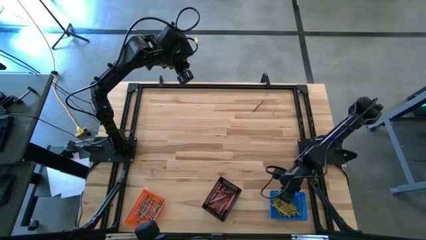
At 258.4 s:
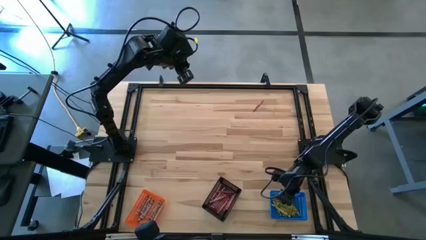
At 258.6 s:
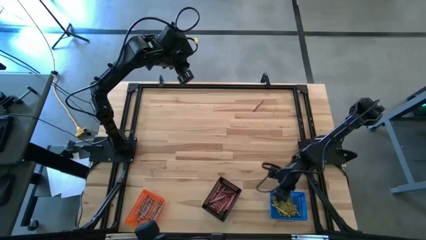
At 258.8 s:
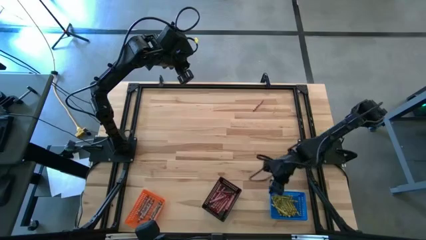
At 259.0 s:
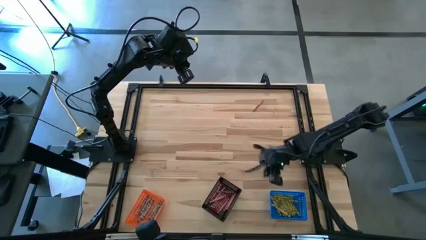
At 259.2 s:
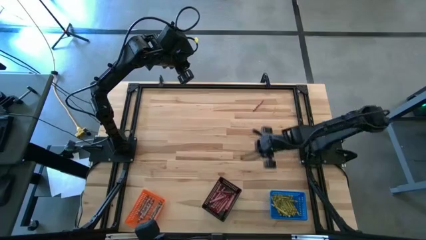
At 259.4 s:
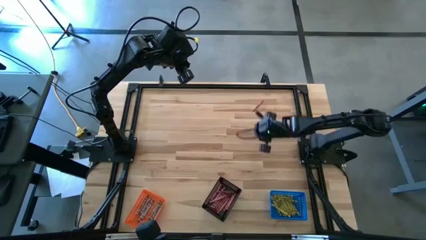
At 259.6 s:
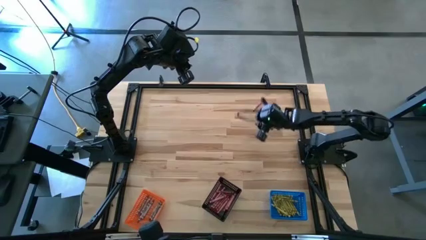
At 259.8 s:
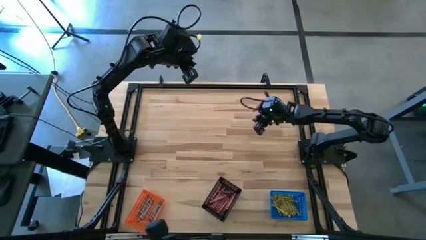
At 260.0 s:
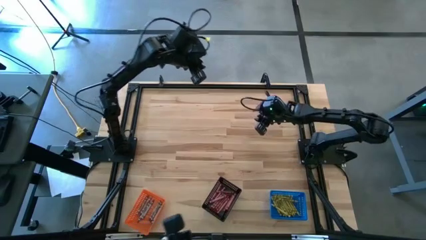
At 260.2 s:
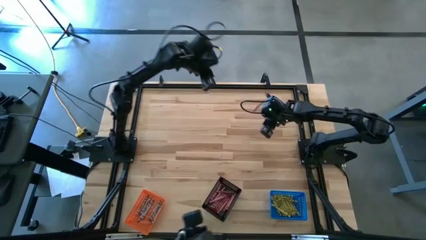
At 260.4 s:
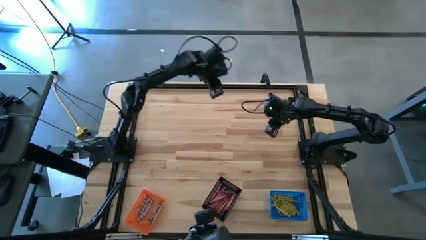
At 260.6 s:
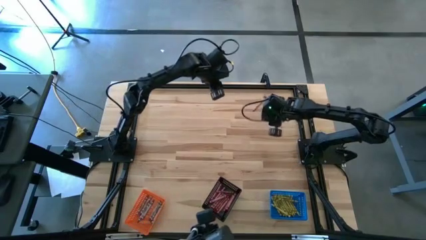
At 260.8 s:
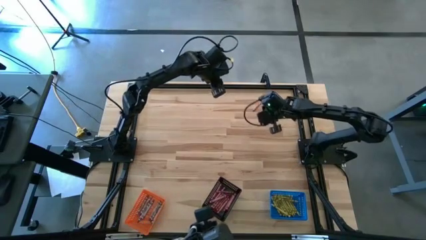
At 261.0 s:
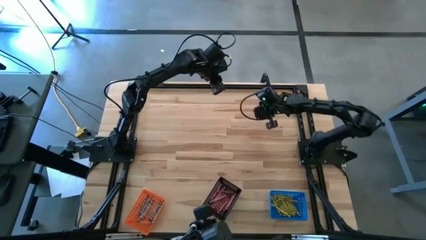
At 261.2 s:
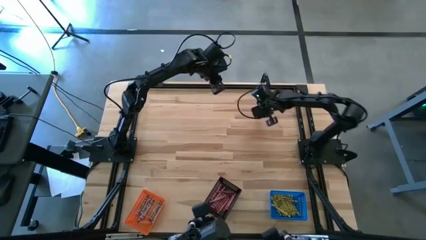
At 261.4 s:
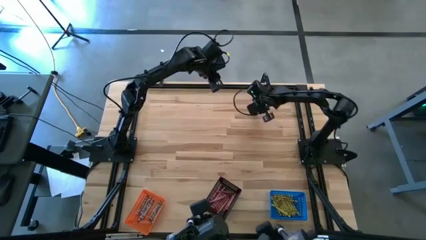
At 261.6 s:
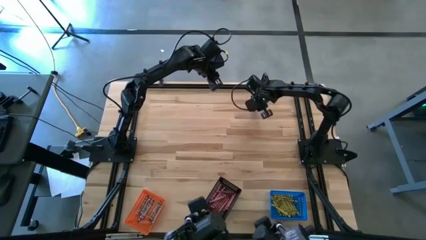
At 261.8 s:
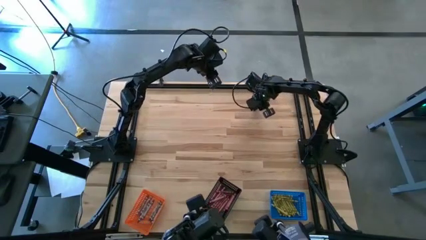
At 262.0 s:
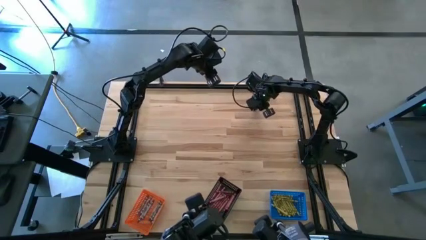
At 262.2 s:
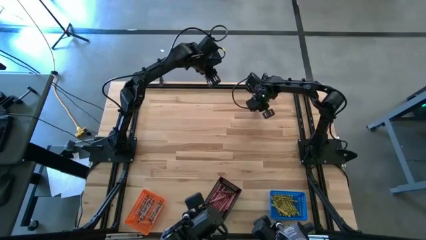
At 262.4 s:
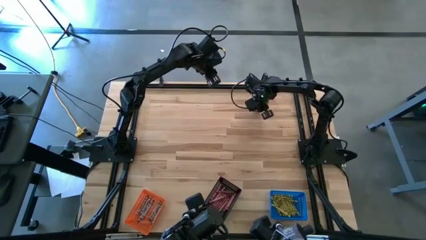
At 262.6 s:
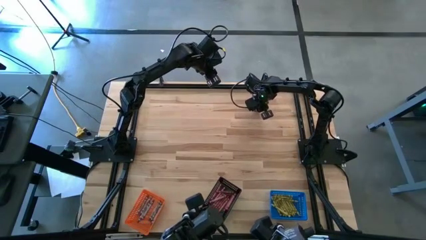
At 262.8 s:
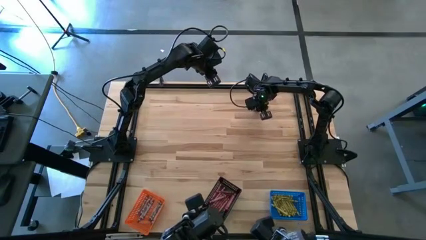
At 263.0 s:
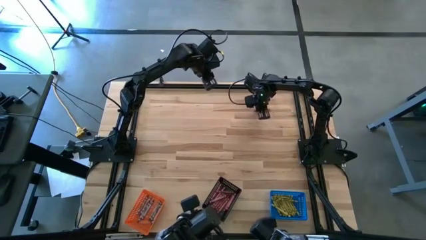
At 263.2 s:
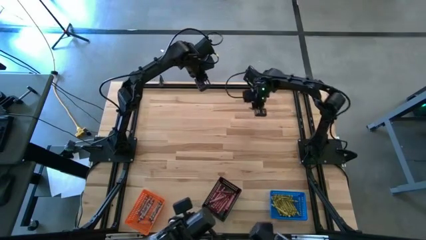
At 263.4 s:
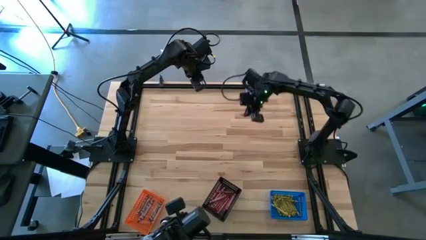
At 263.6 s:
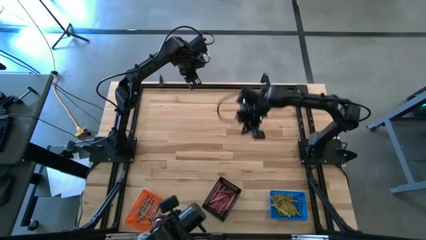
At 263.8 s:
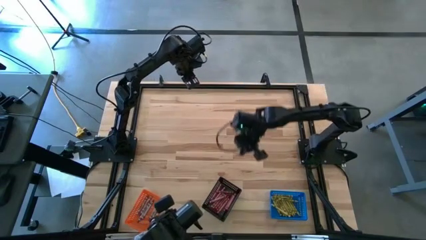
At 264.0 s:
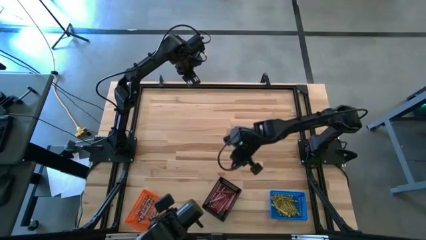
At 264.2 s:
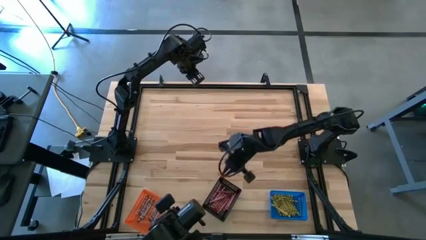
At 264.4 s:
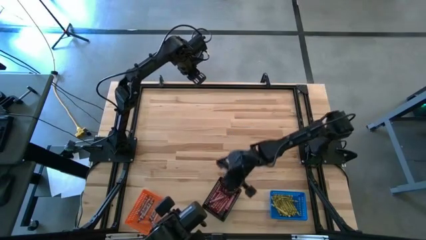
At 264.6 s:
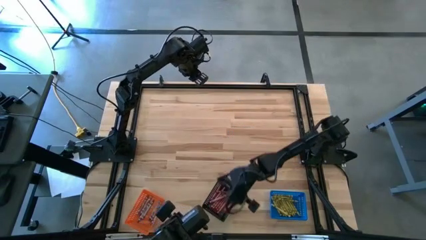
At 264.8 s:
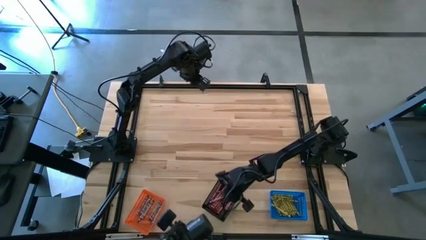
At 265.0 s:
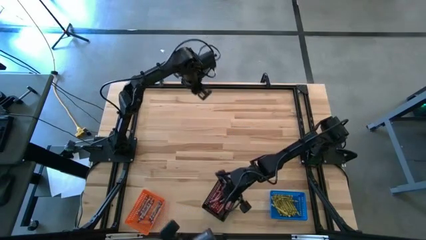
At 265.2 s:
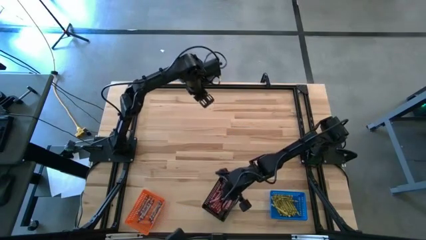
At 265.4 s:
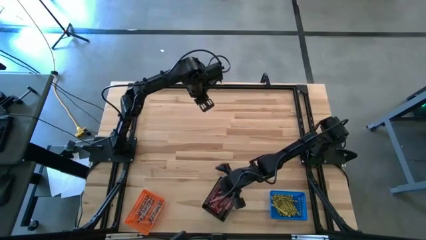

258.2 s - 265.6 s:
Task: Sort crayons
Put the red crayon into the black bin

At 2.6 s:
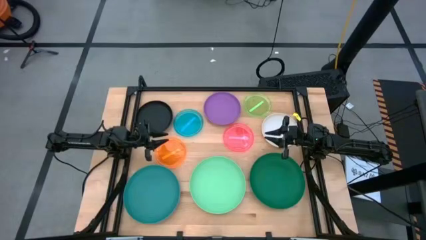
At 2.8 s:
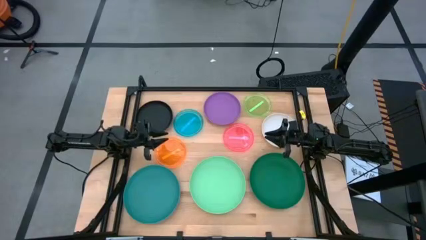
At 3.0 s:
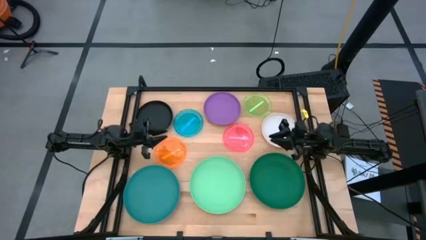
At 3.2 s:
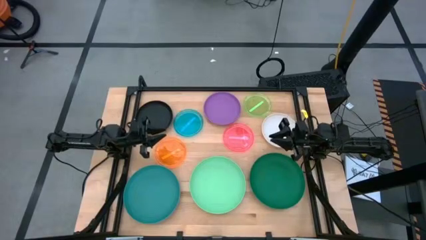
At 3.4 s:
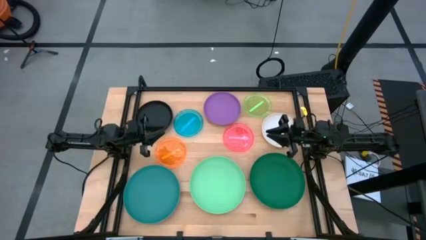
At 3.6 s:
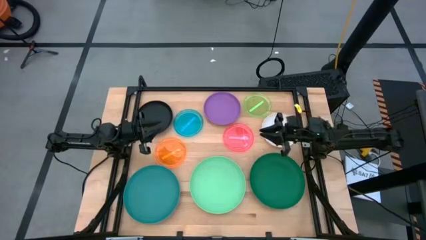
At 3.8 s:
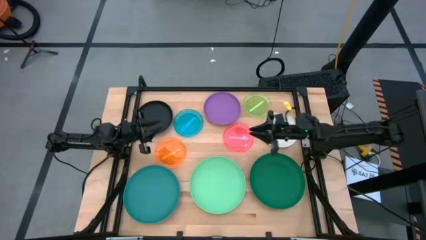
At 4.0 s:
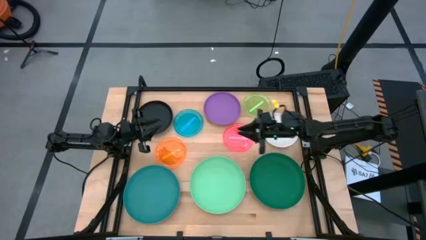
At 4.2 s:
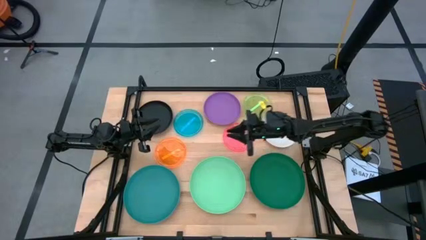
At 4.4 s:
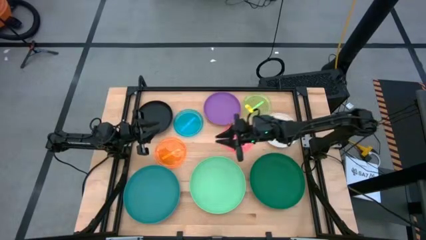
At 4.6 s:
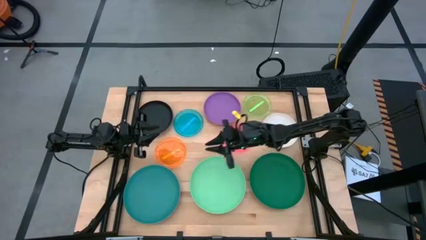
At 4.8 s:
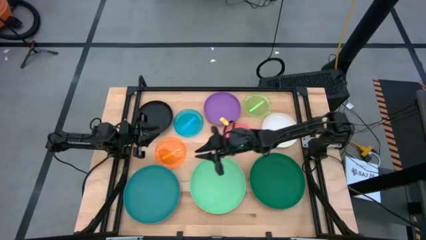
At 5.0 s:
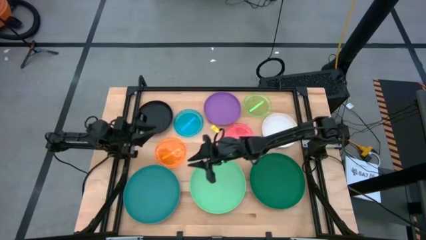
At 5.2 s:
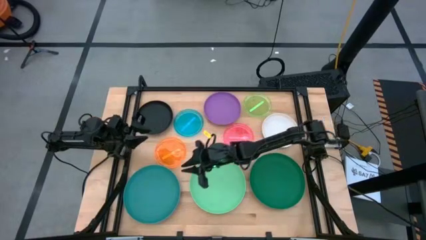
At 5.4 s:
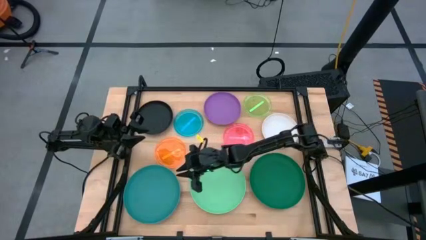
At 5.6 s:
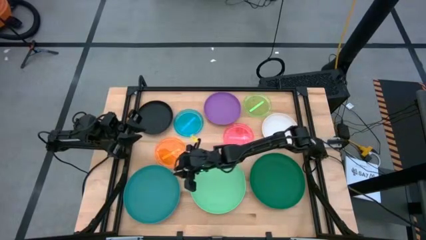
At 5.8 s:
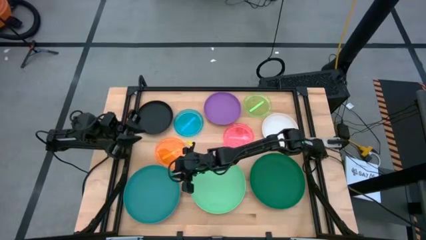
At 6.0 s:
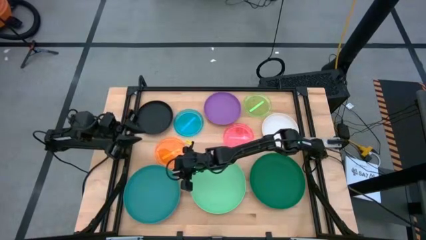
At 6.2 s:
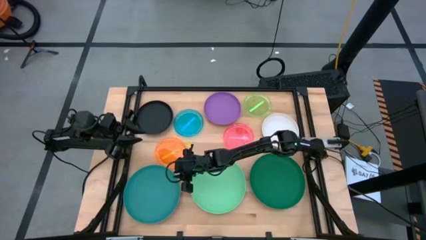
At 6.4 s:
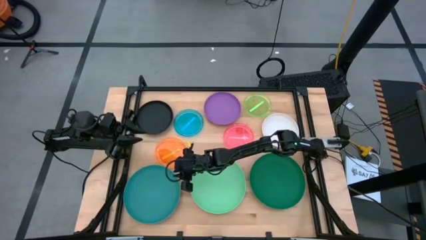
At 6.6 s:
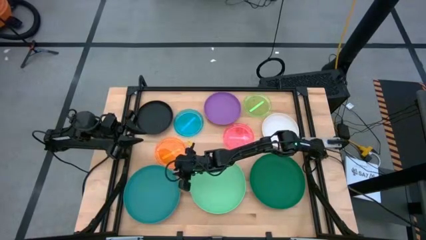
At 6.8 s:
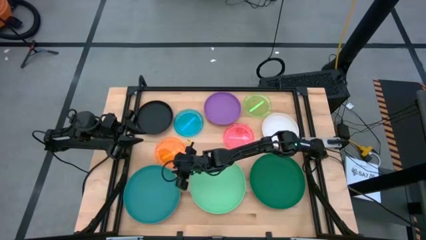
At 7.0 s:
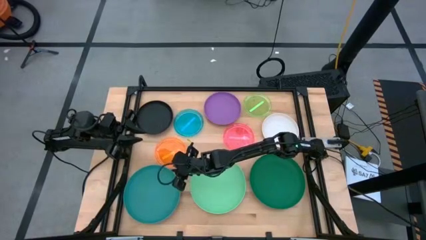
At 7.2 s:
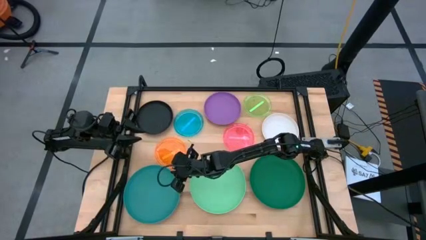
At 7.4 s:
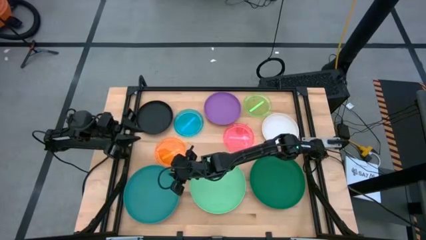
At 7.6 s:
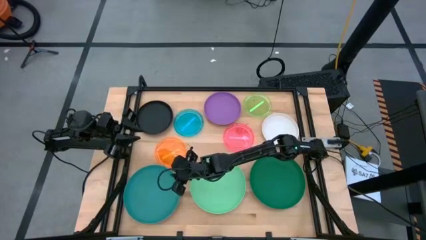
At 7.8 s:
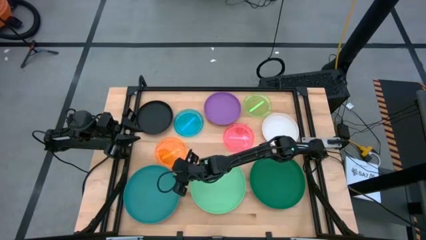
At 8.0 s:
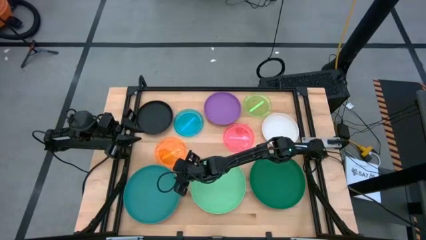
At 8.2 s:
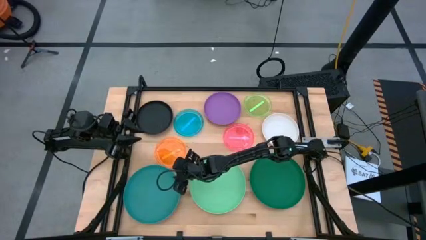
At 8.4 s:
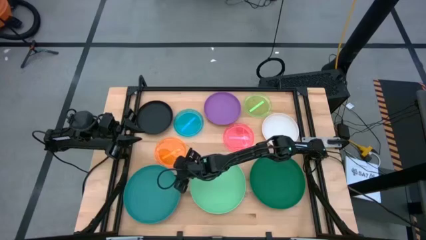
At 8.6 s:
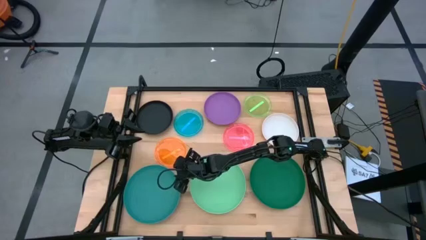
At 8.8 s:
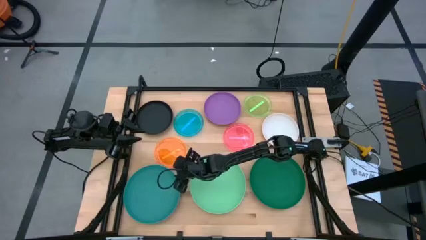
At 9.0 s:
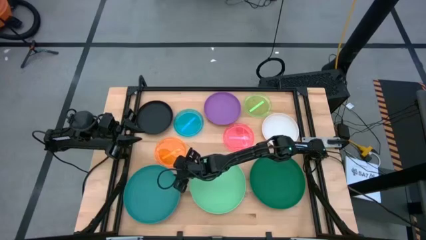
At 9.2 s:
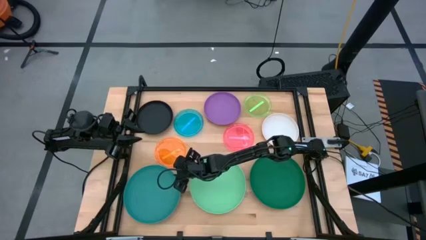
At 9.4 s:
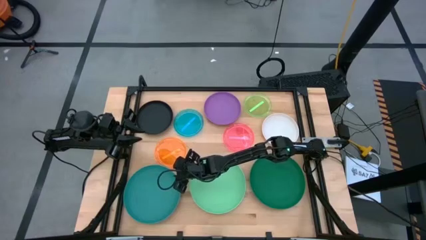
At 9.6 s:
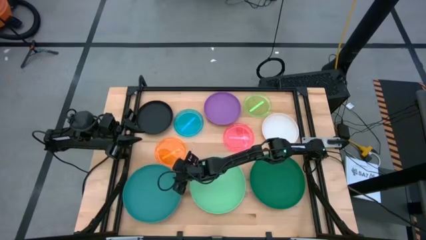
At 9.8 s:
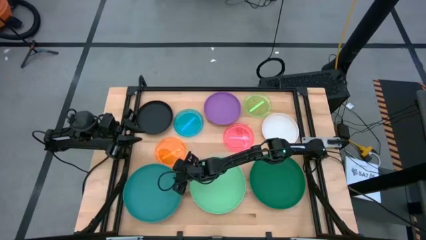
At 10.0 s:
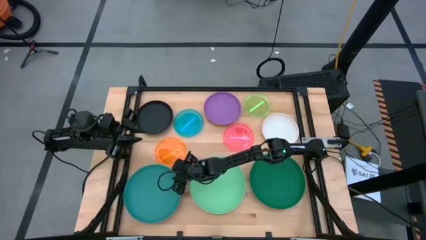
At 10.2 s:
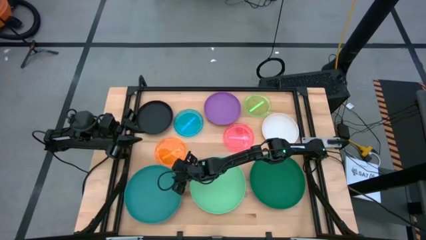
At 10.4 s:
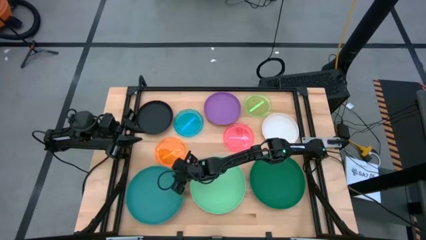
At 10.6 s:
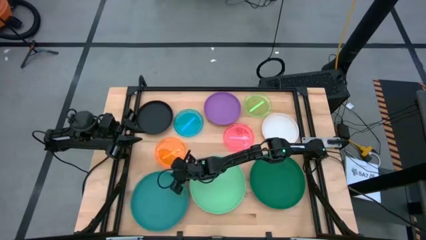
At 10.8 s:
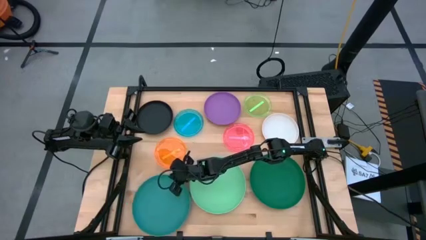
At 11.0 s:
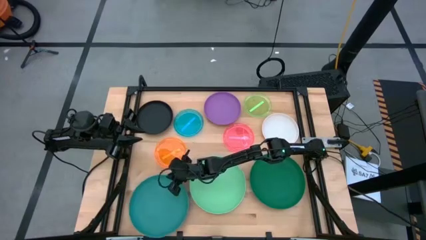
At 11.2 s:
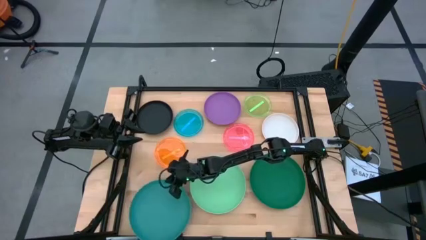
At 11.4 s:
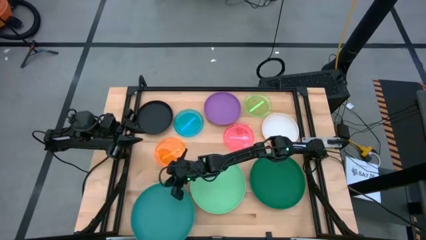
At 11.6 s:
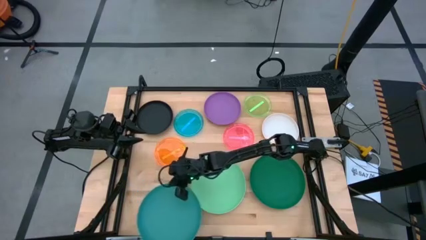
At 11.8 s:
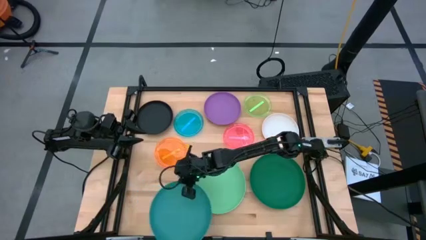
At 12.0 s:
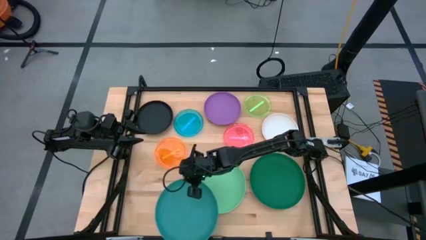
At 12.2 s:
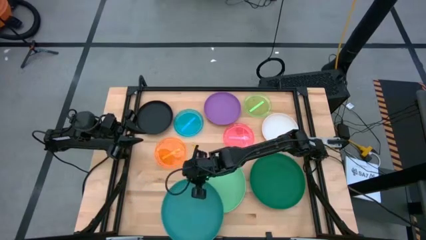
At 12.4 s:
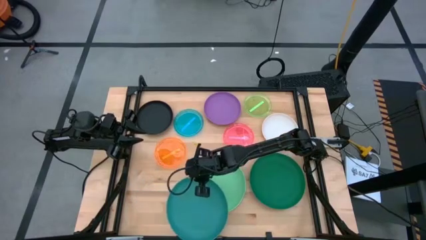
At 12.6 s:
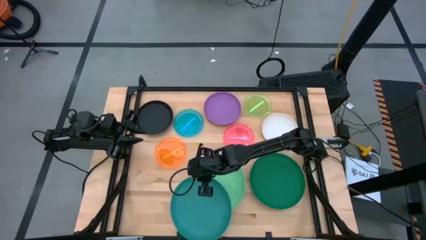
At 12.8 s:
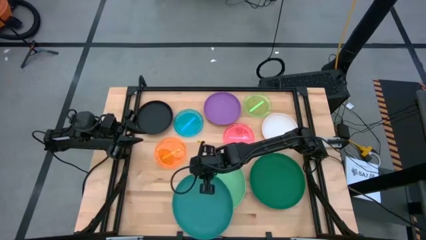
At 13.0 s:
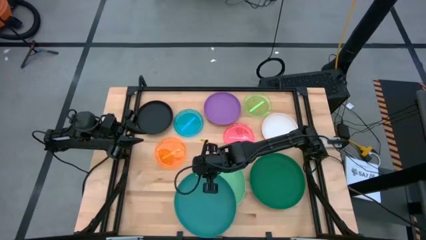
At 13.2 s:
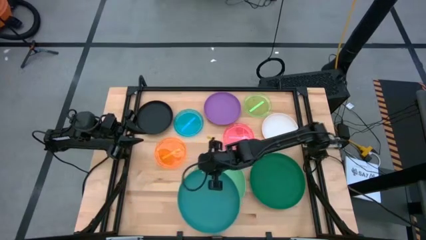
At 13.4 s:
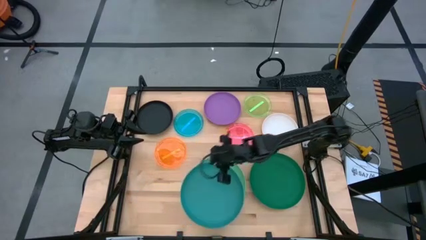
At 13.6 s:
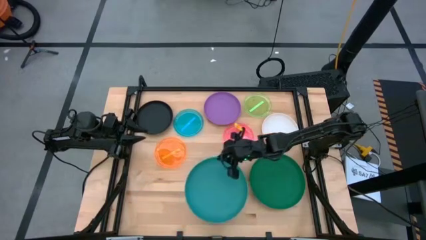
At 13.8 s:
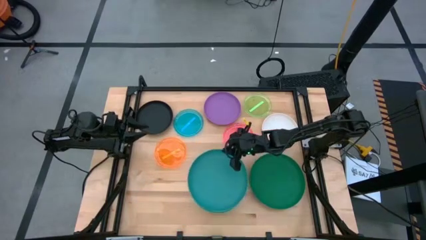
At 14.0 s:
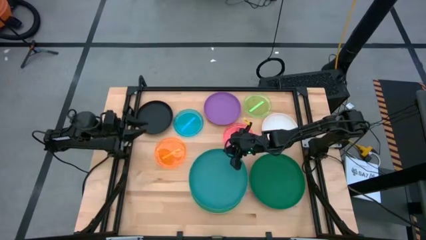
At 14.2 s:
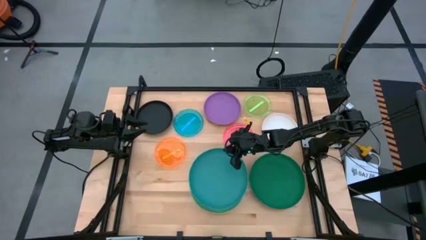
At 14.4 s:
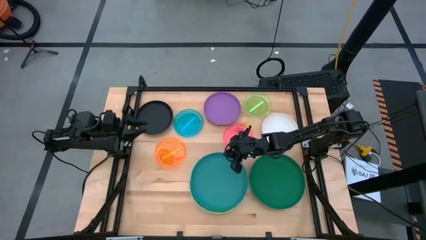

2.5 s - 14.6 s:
Task: Stack plastic plates
Stack the blue plate on top of the light green plate
